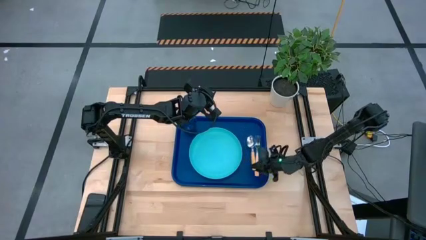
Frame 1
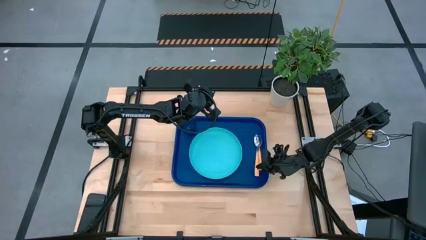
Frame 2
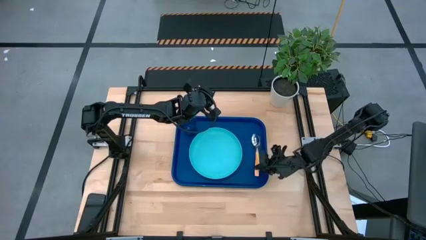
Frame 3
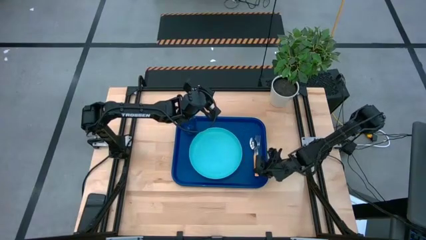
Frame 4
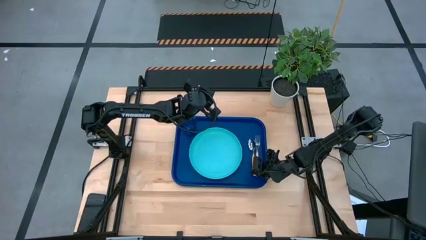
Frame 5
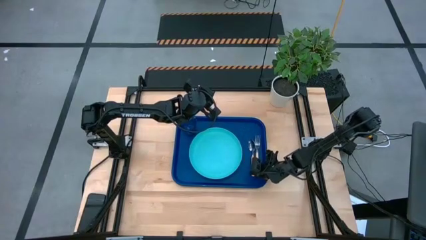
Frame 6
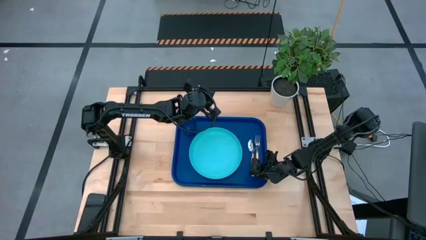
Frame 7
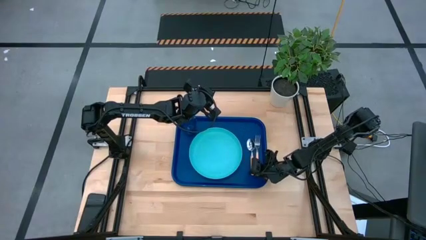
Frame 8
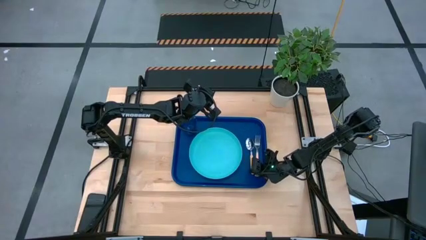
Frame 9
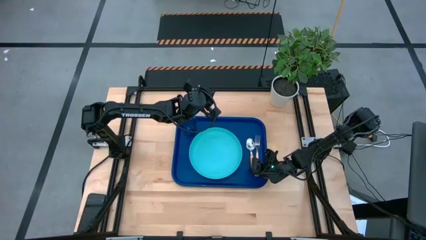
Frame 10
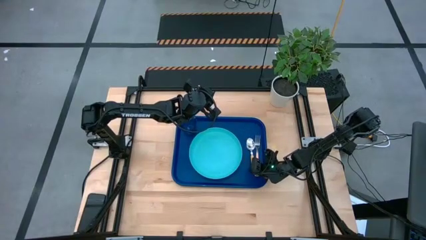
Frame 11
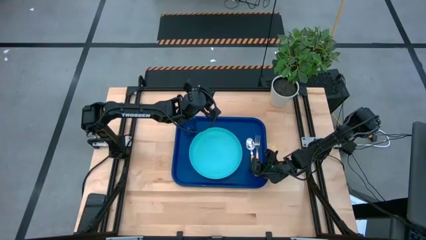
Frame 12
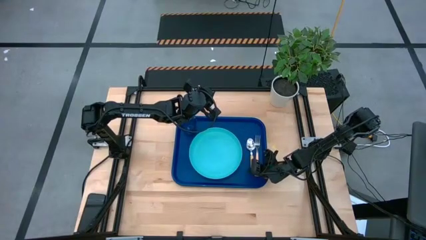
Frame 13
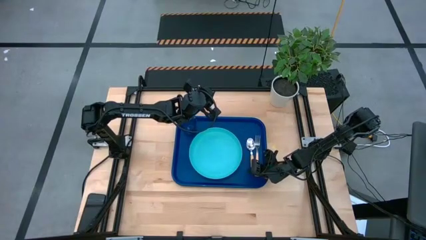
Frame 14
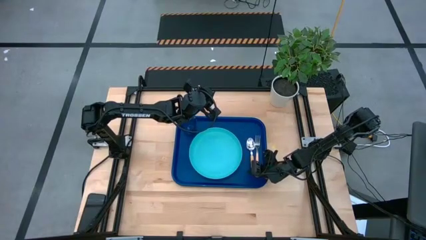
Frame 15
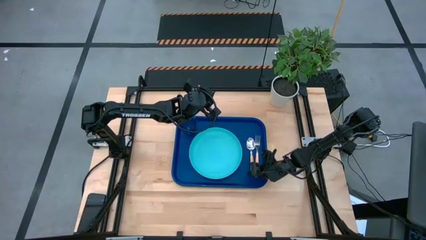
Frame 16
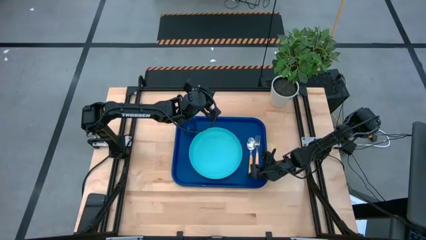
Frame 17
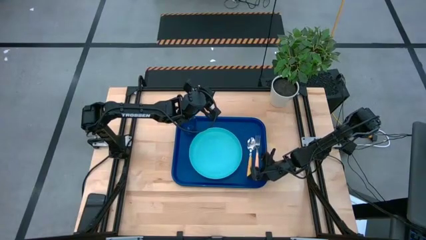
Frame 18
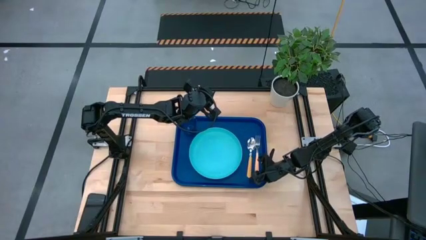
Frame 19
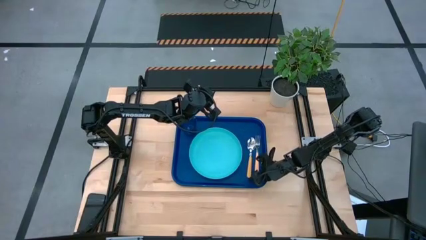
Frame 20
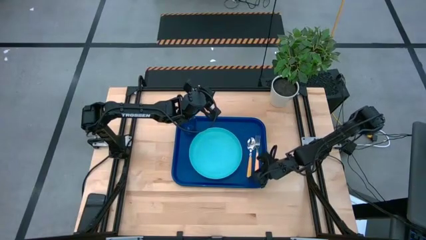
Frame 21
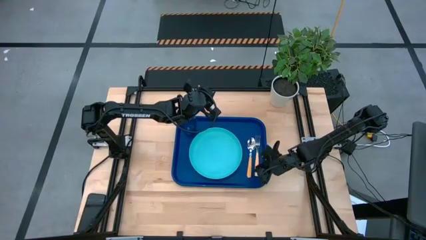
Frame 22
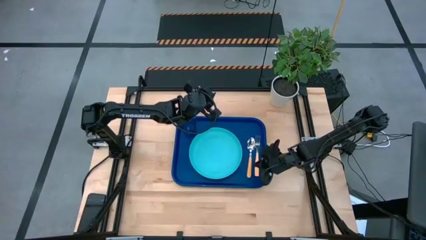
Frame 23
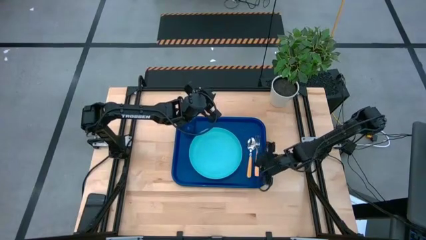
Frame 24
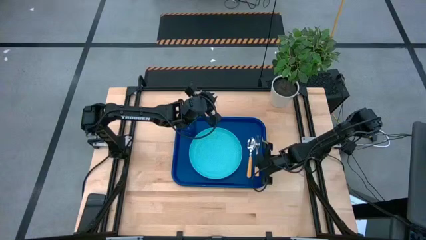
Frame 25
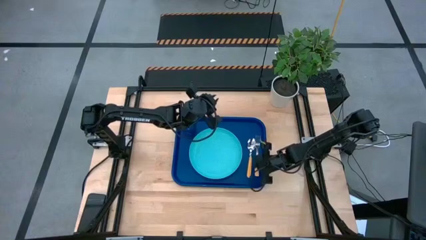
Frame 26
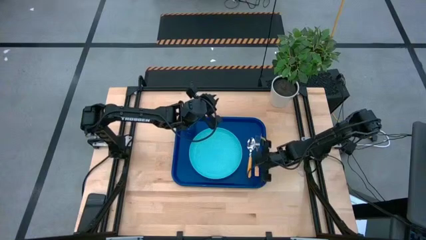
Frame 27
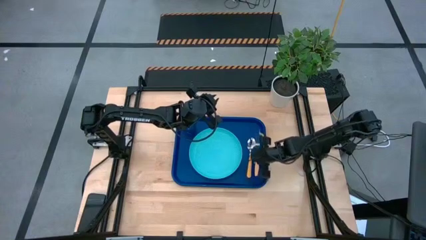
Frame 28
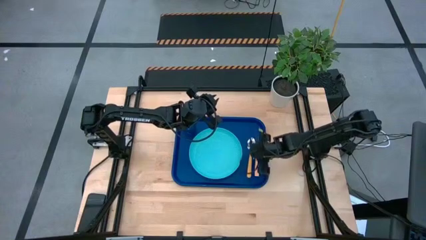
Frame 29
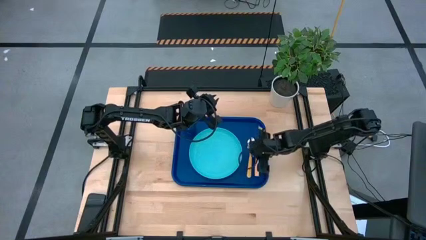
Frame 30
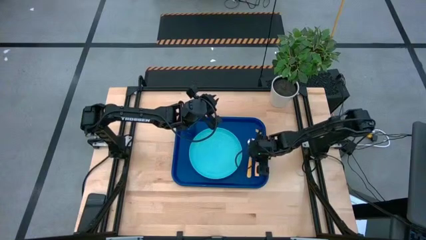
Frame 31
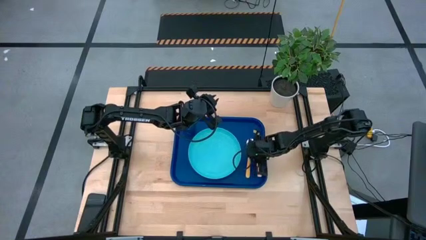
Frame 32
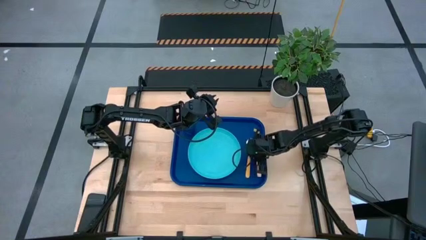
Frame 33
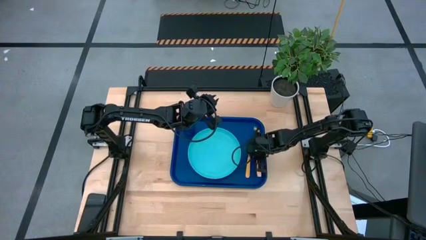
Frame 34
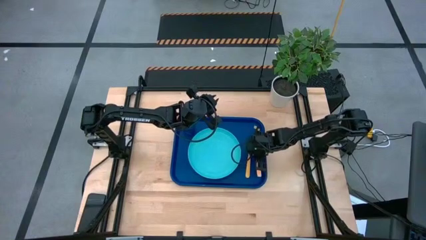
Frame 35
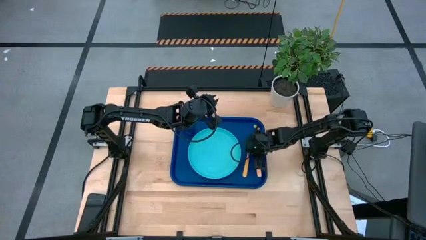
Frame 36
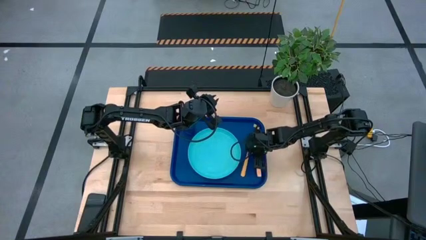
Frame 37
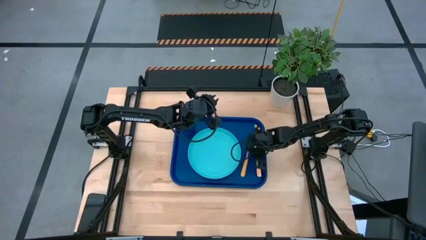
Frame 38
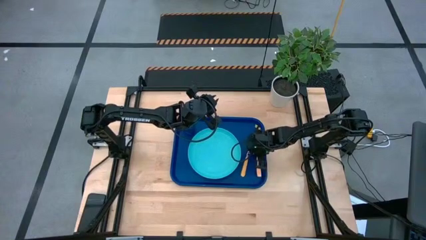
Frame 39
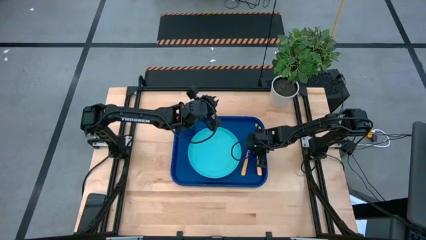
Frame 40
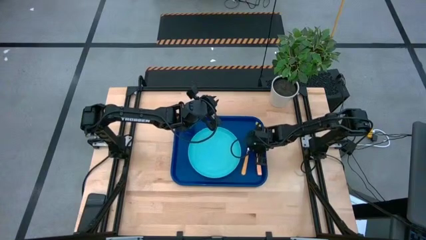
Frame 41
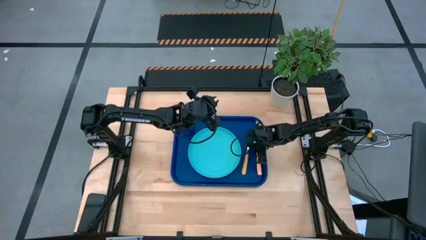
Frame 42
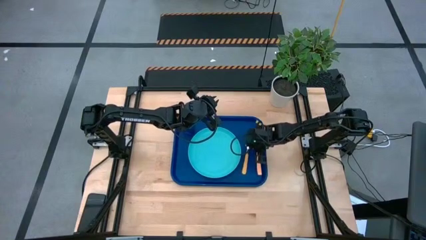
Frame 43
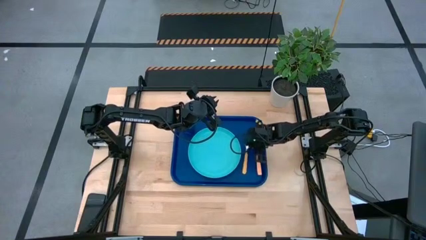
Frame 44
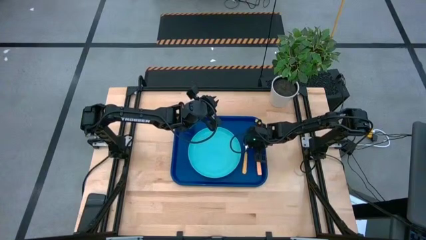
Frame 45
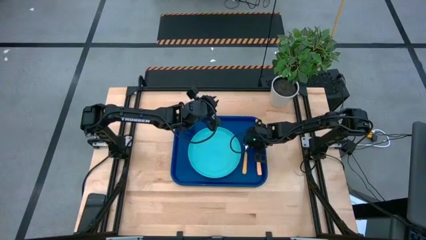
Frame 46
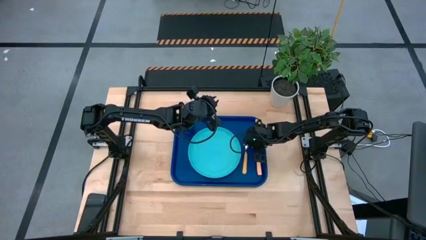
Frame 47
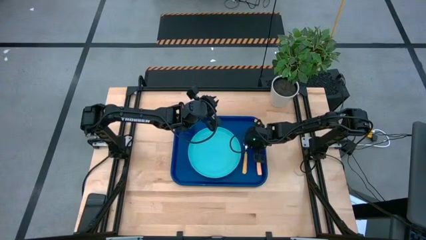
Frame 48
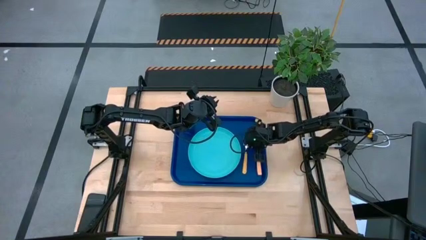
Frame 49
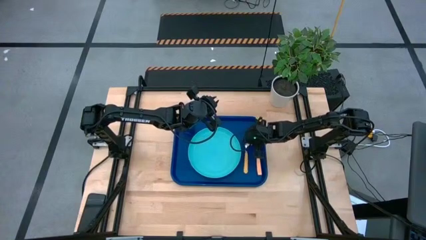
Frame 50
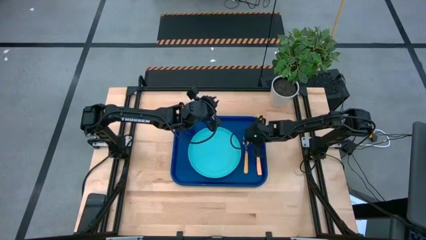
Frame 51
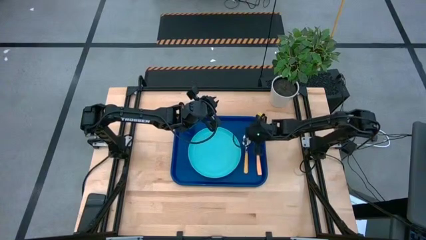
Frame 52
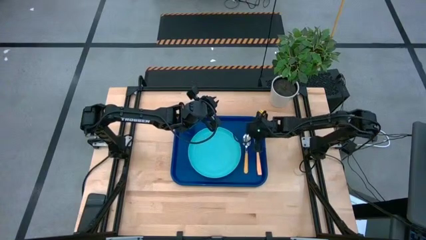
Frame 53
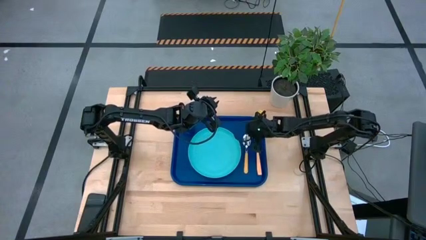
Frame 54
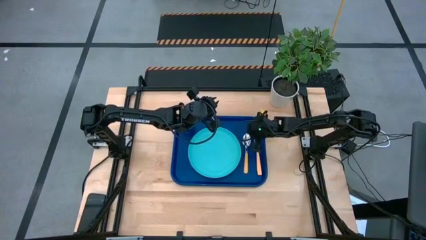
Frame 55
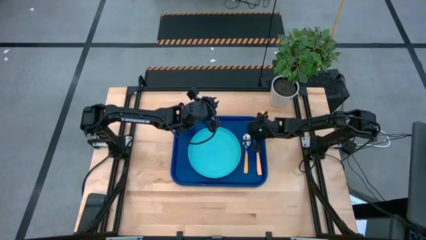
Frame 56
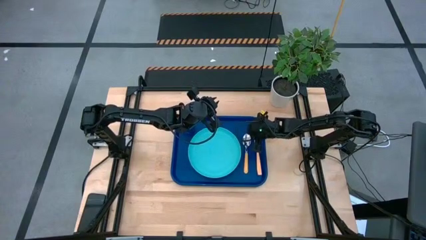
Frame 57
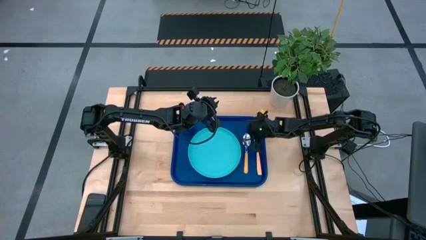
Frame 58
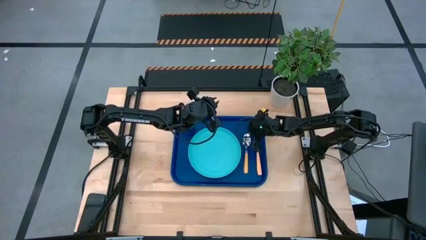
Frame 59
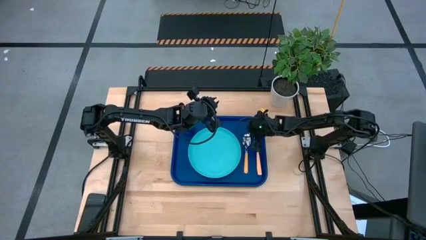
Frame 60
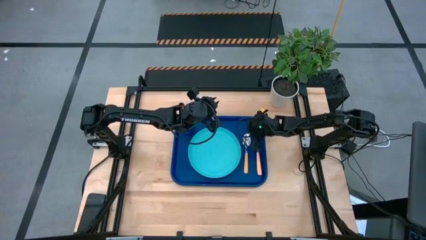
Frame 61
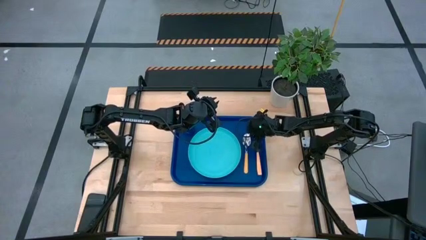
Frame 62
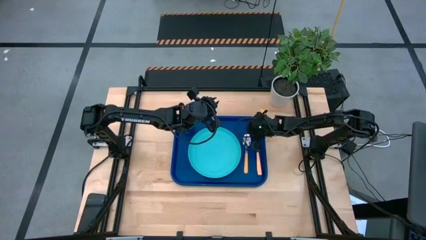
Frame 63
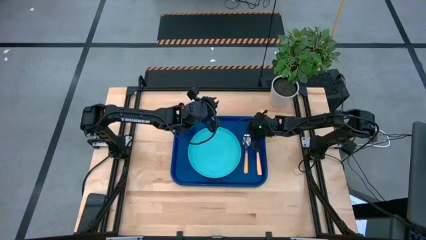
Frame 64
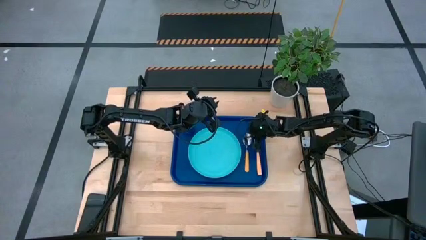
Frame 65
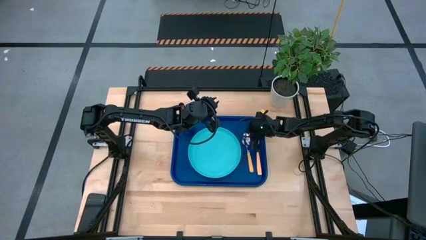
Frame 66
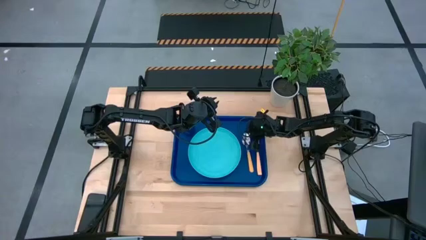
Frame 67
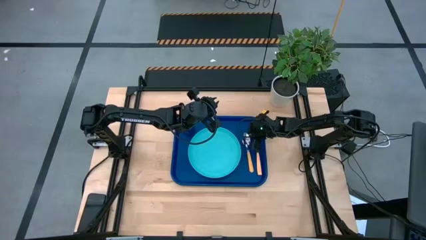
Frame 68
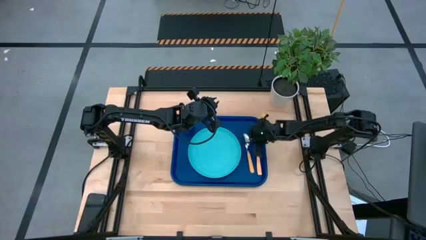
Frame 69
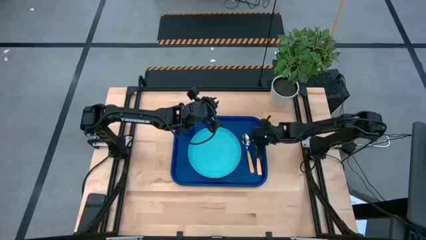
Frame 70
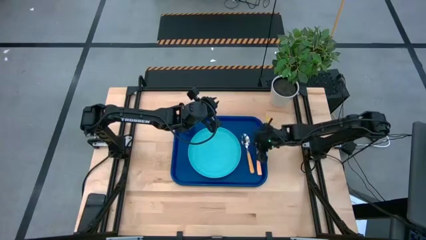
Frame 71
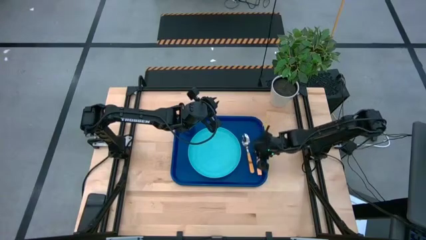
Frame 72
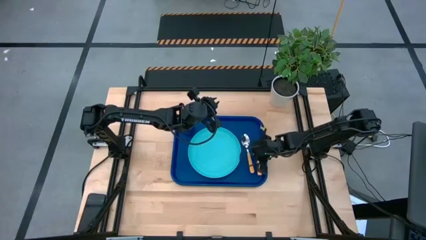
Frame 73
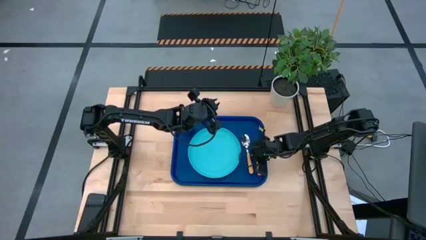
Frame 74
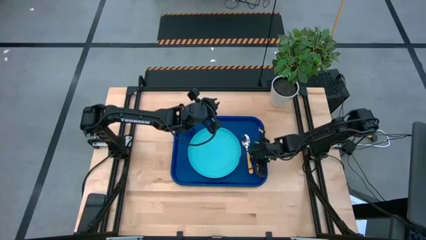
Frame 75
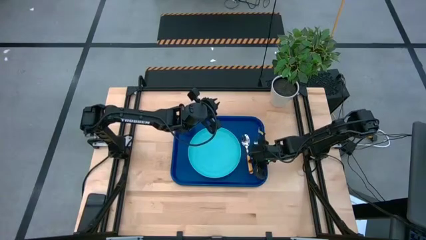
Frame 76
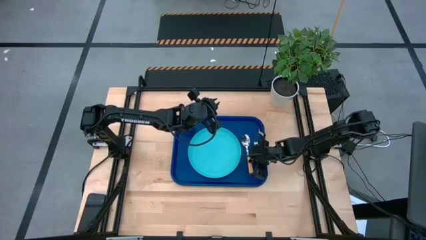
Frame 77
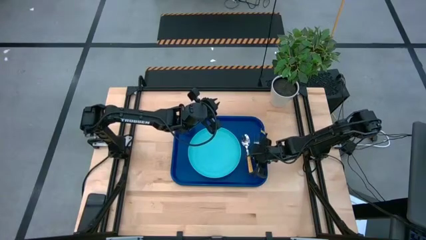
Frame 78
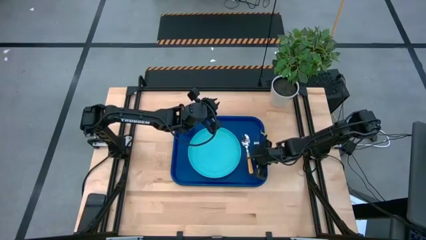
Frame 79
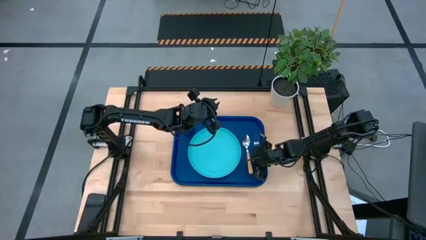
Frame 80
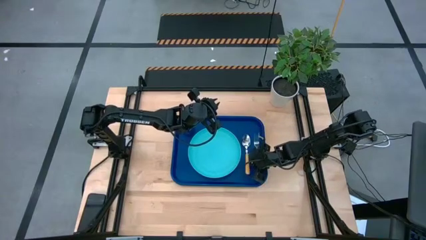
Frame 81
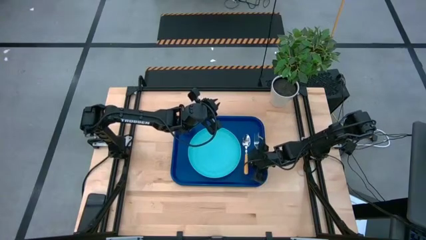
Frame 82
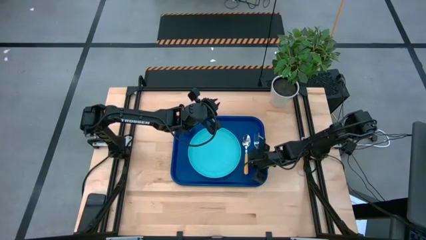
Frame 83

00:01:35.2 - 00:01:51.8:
Task: Pick and place plate/cup/fork/spoon on tray
Put the yellow spoon in the middle of the orange fork and light blue plate
